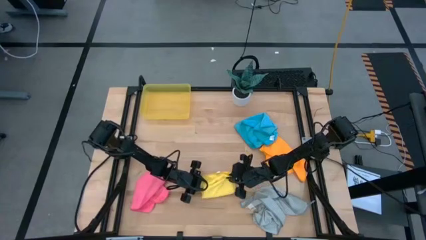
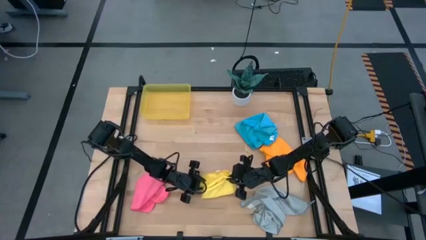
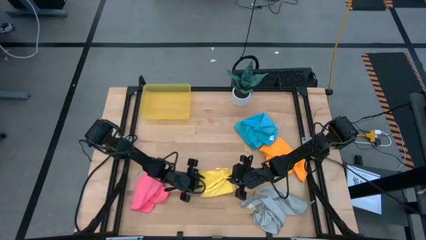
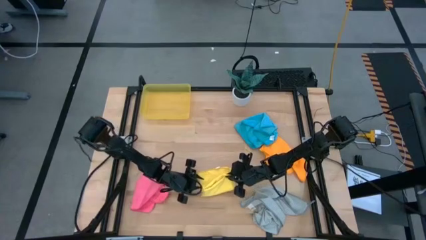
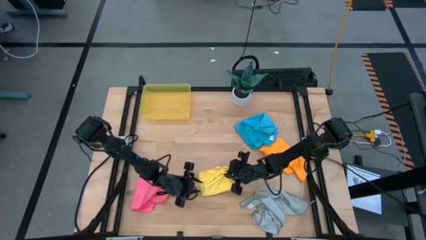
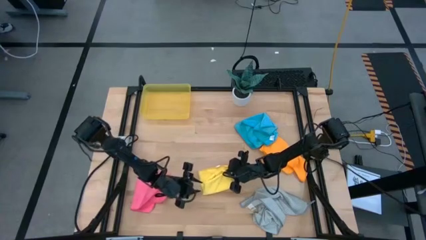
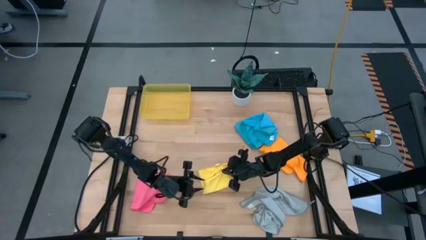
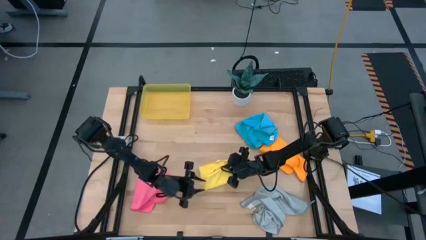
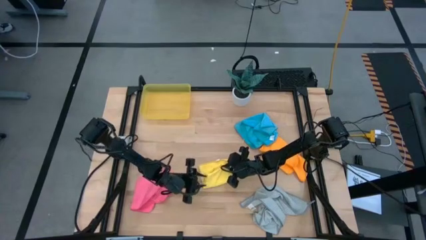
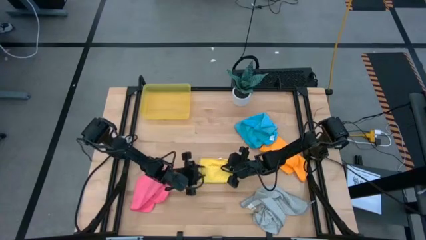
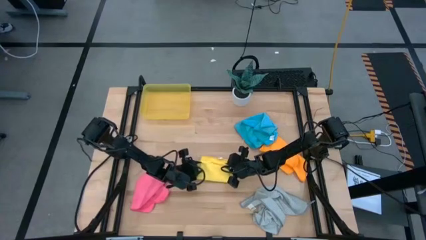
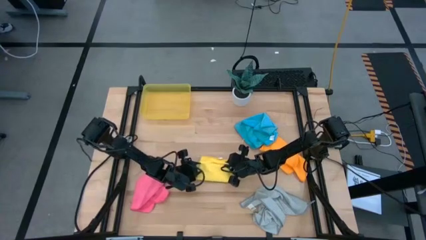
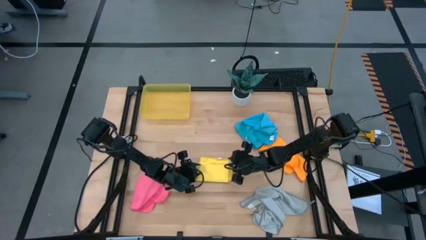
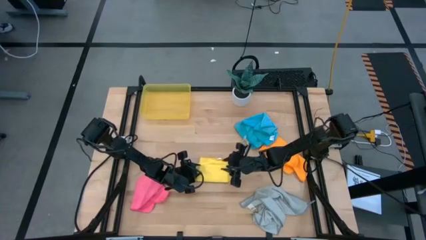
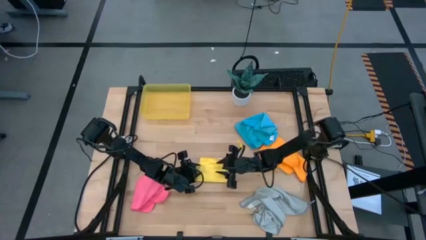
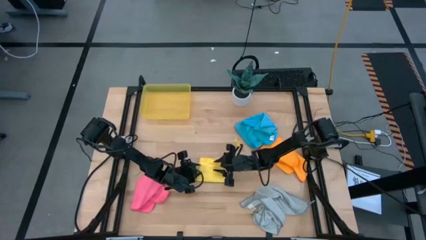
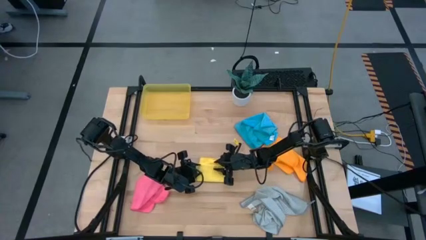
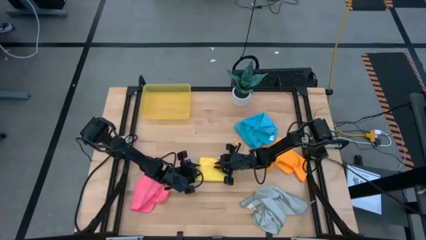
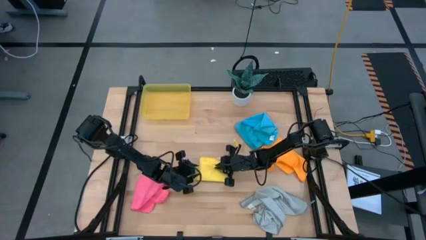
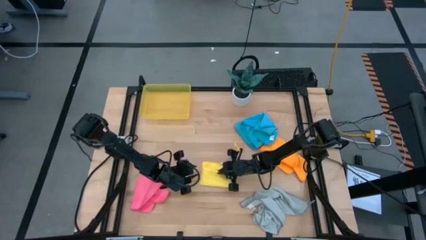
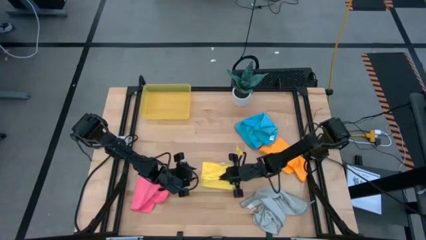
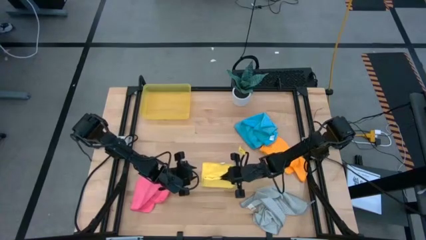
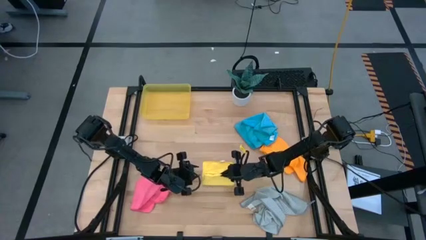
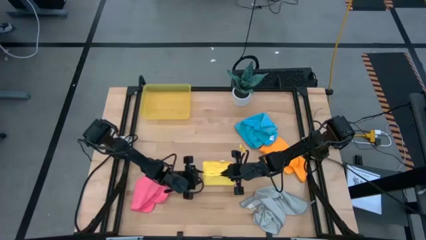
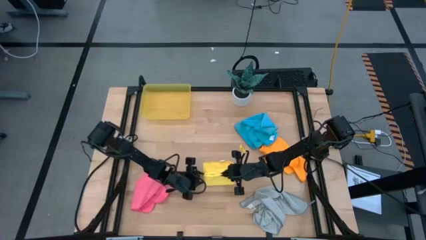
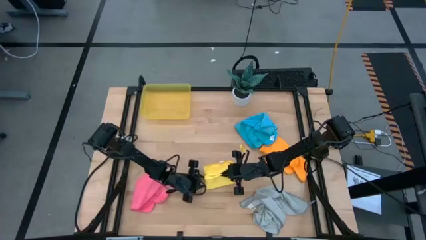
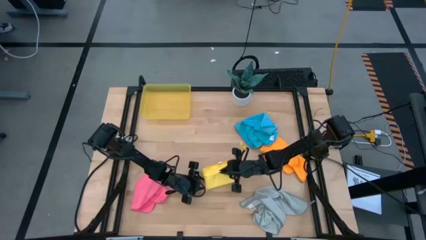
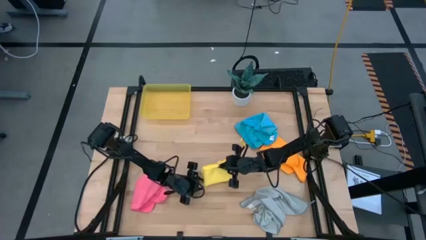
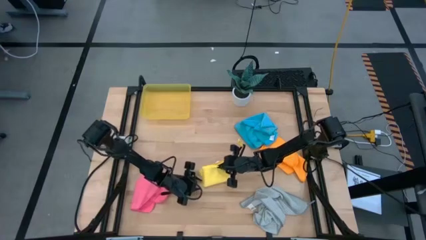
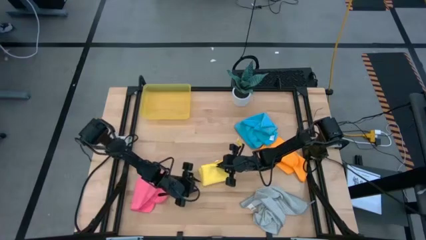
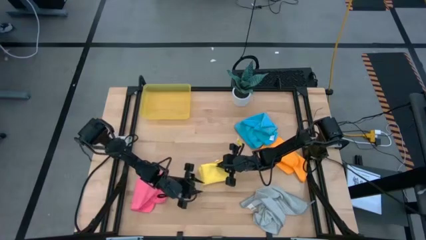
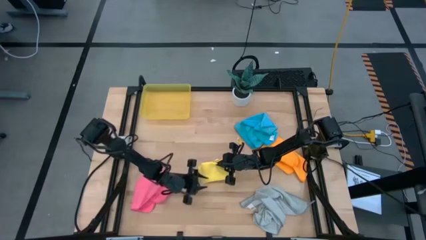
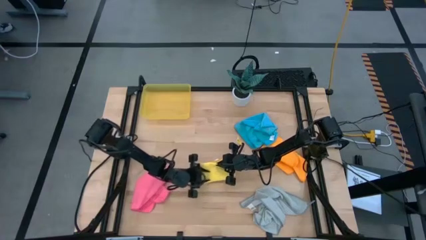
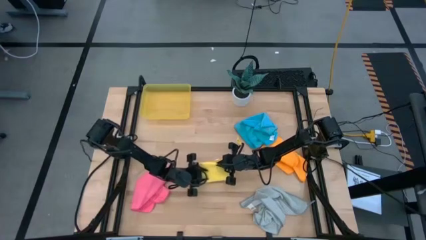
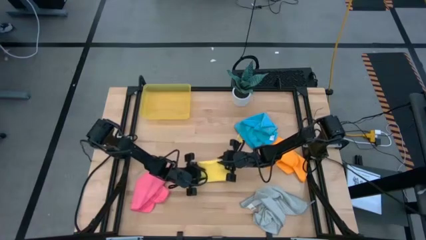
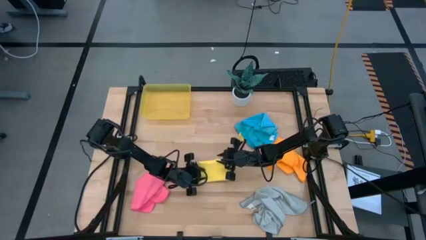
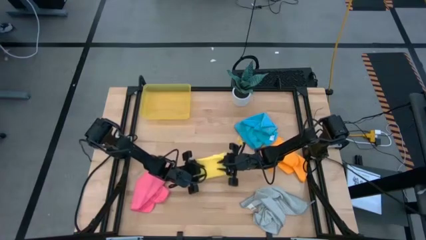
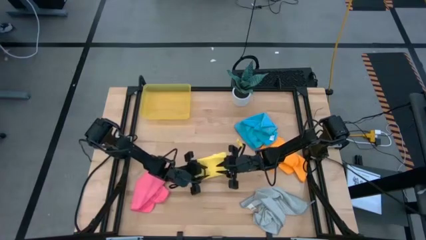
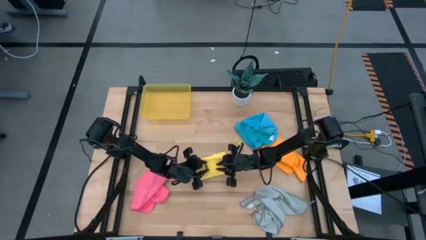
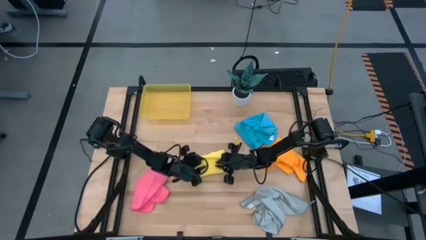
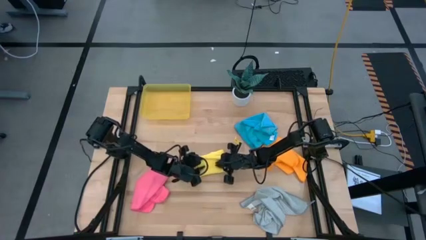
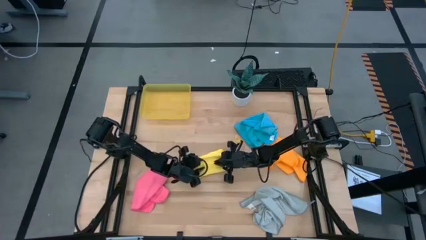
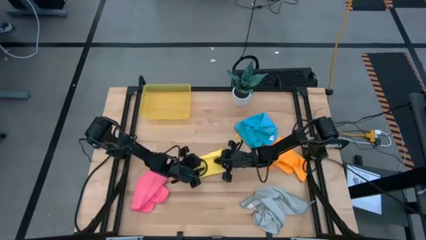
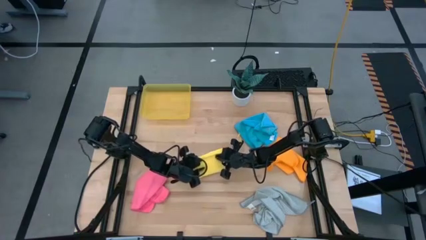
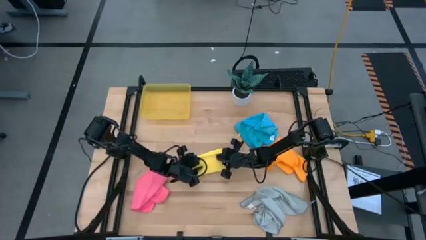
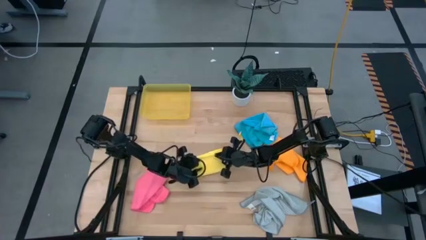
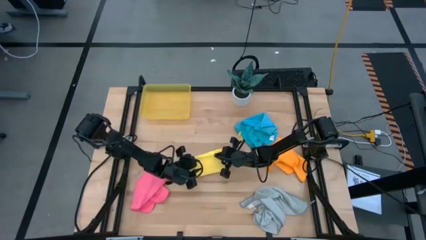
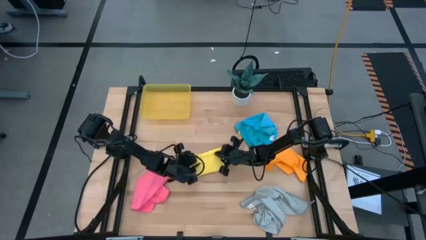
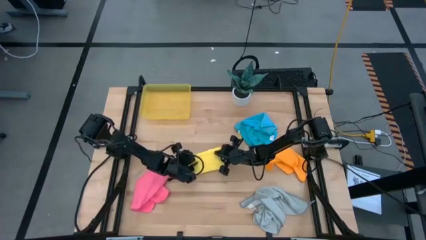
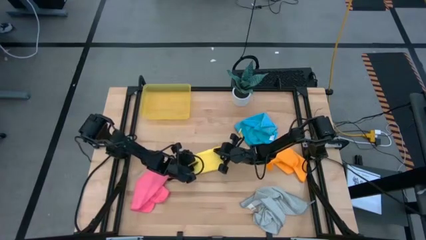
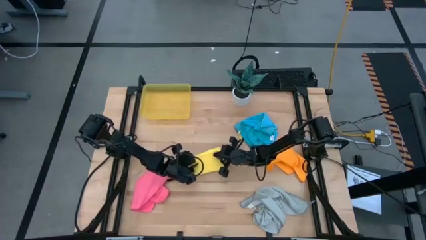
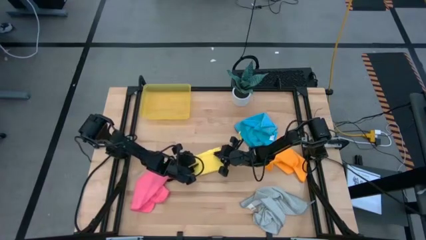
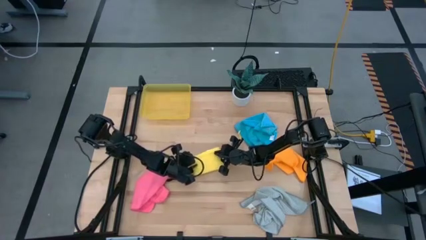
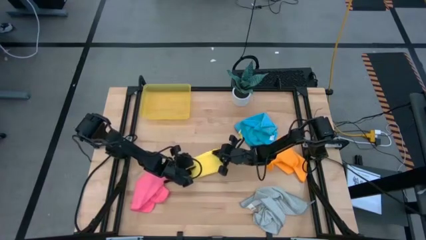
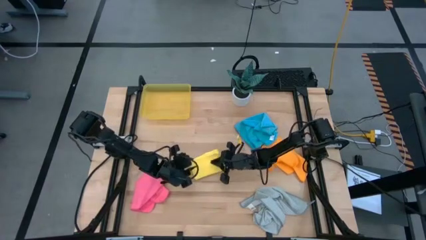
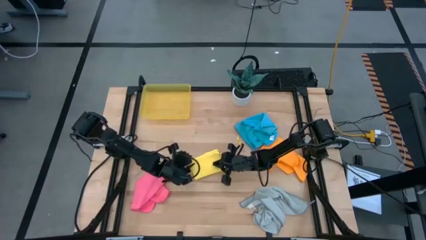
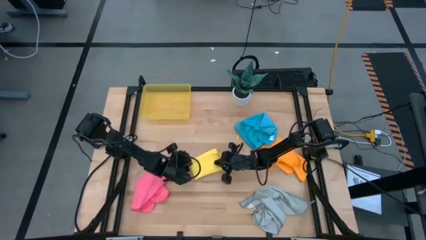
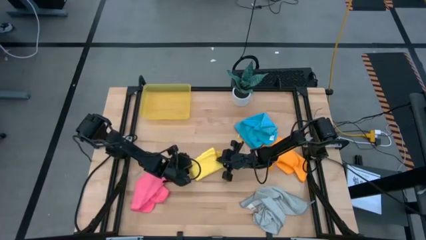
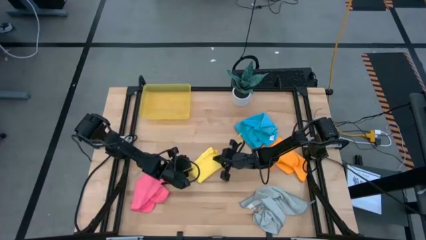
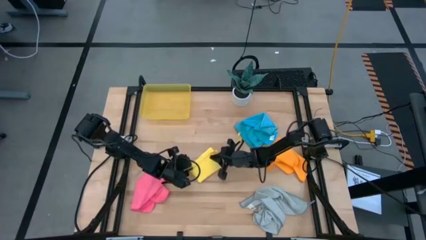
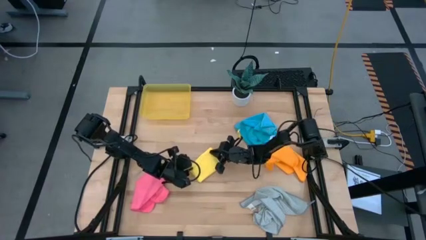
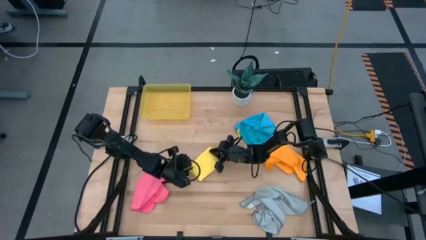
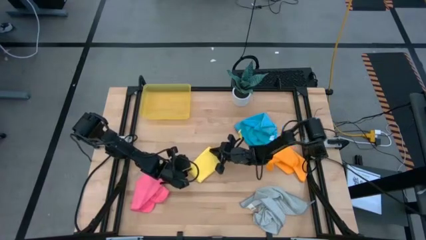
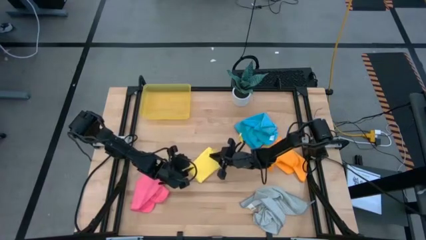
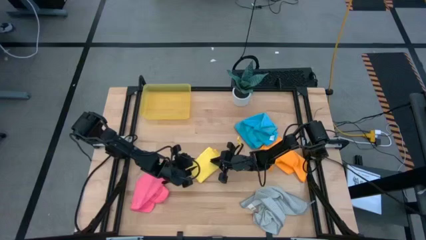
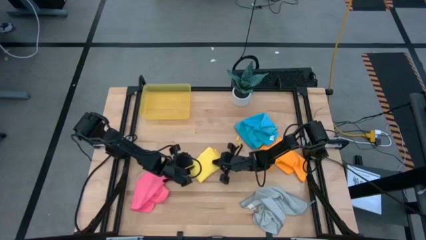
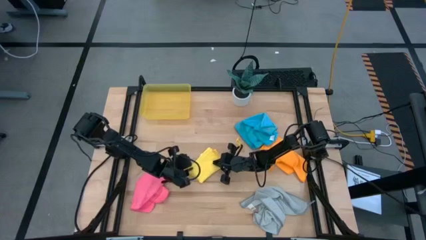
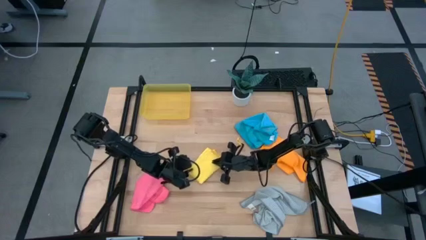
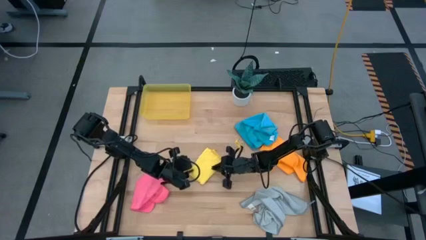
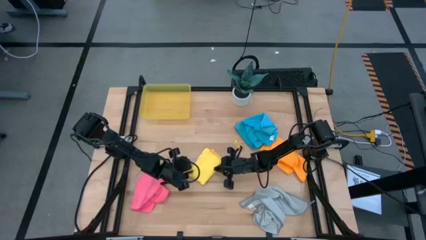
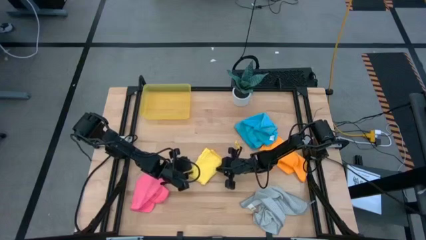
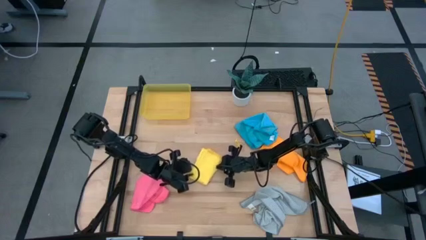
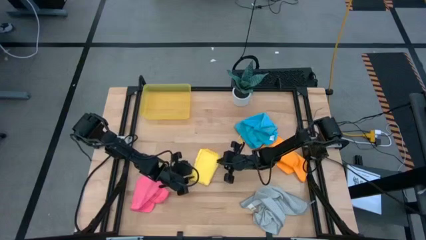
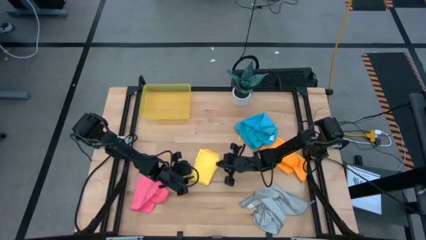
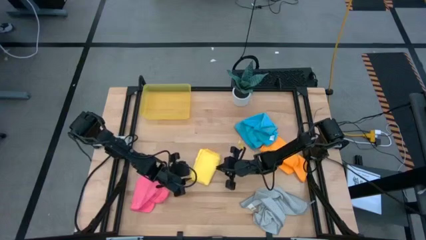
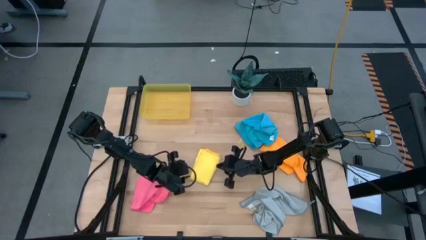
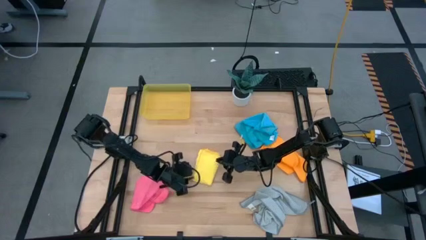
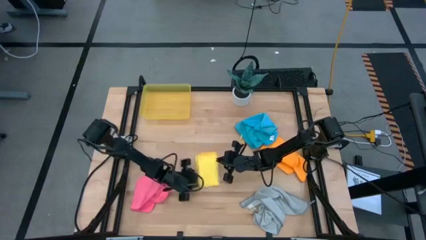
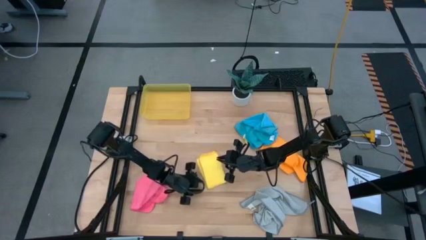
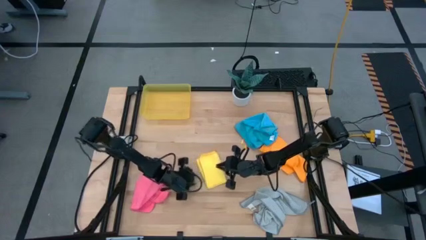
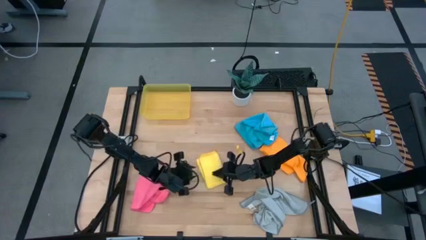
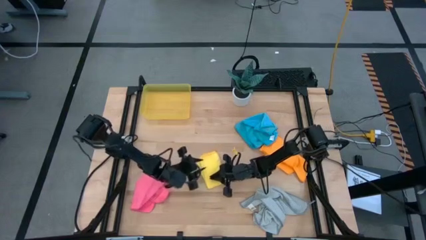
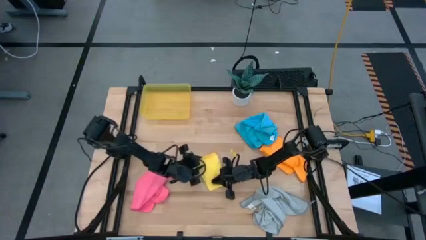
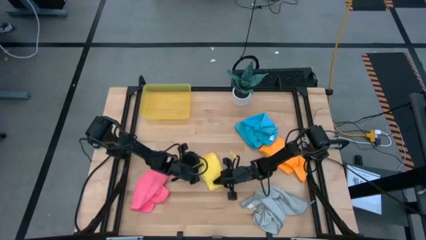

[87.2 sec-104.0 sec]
Task: Fold microfiber towels
Fold the yellow microfiber cloth
